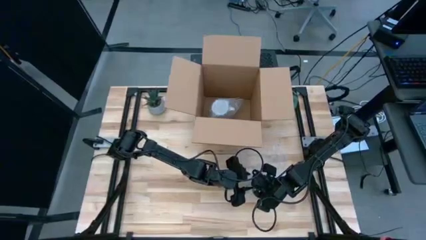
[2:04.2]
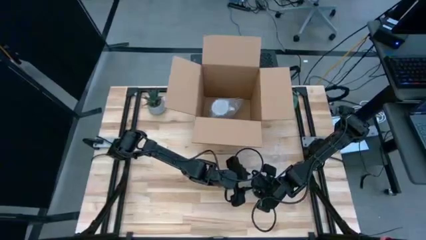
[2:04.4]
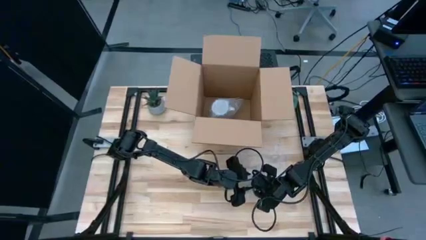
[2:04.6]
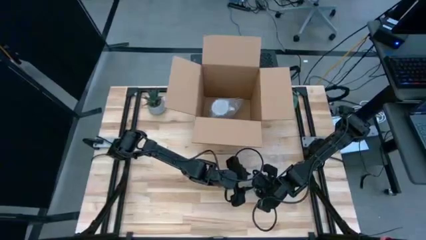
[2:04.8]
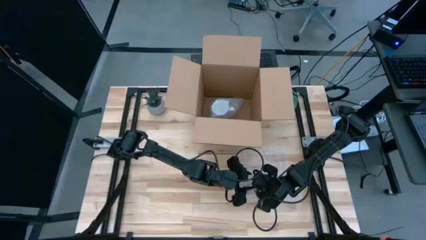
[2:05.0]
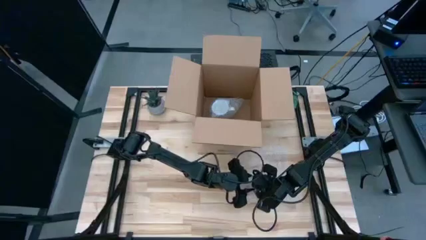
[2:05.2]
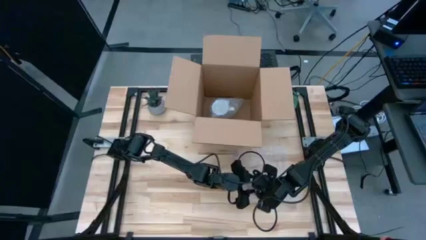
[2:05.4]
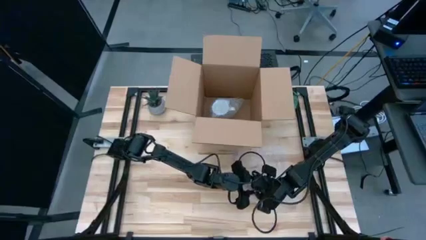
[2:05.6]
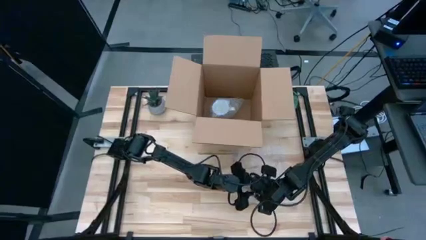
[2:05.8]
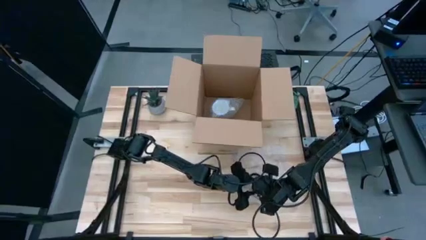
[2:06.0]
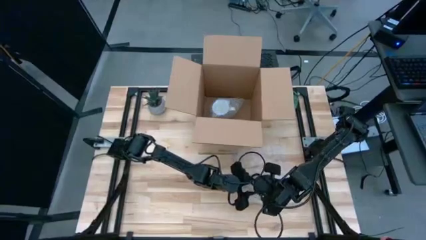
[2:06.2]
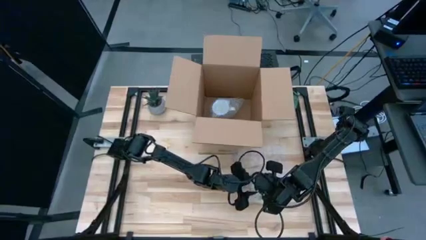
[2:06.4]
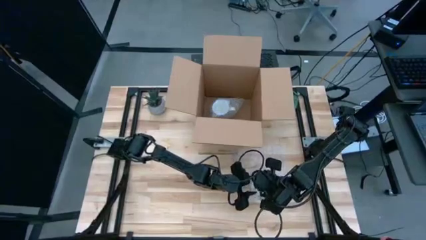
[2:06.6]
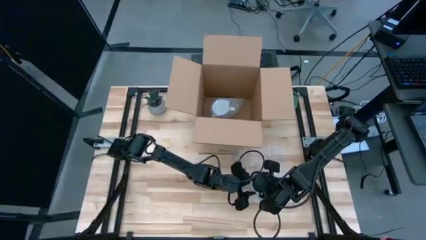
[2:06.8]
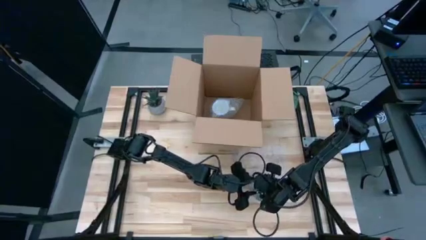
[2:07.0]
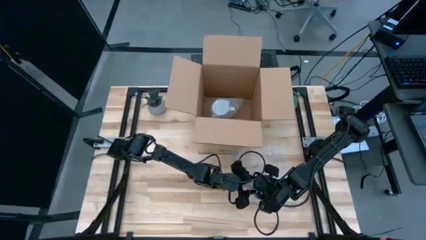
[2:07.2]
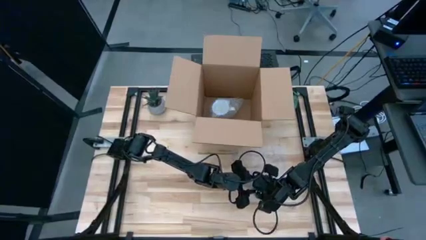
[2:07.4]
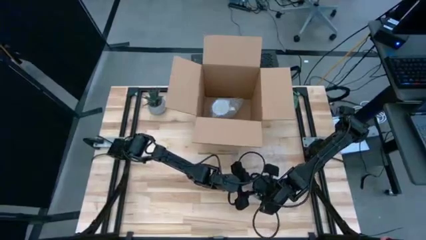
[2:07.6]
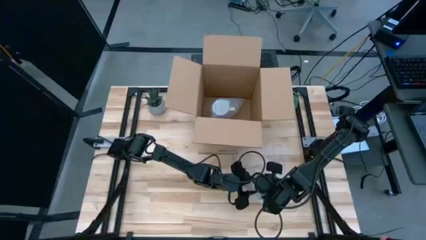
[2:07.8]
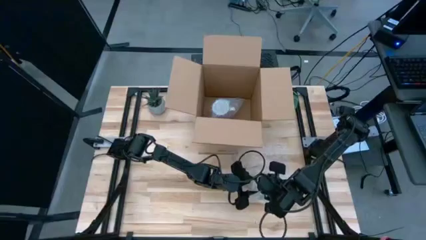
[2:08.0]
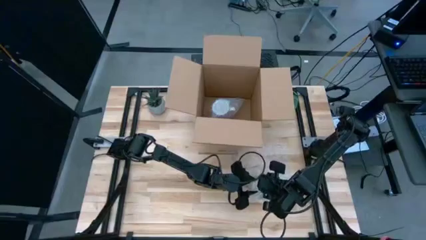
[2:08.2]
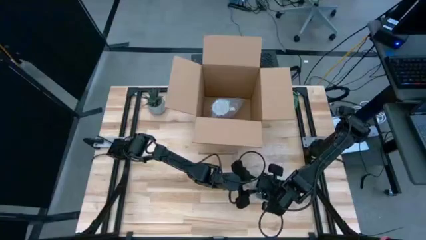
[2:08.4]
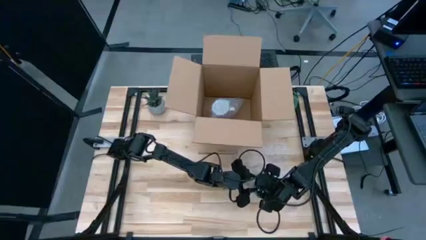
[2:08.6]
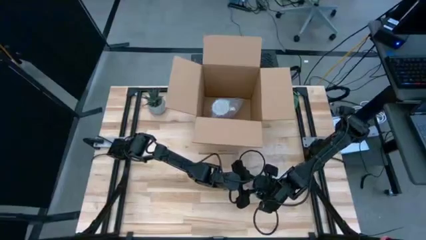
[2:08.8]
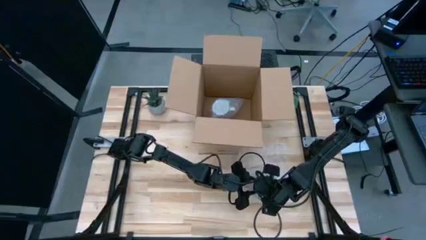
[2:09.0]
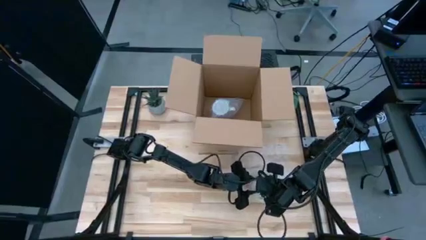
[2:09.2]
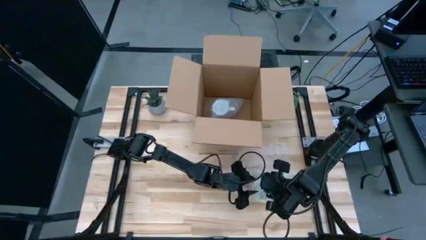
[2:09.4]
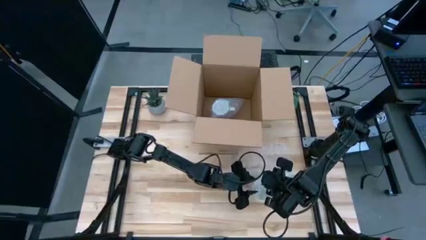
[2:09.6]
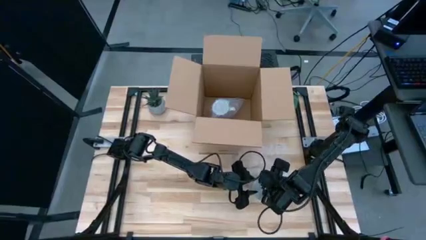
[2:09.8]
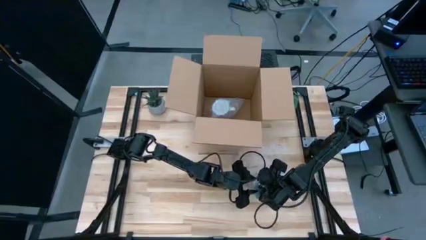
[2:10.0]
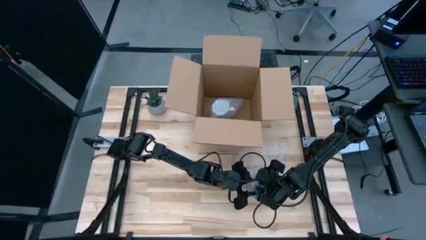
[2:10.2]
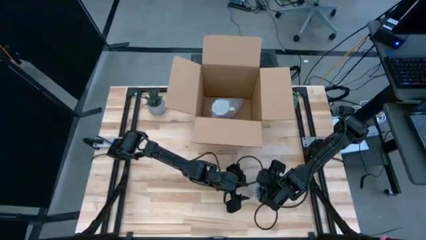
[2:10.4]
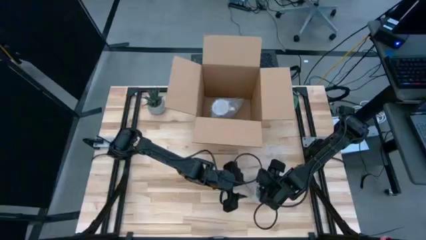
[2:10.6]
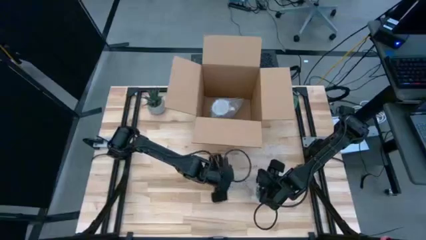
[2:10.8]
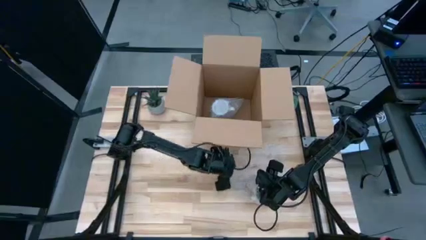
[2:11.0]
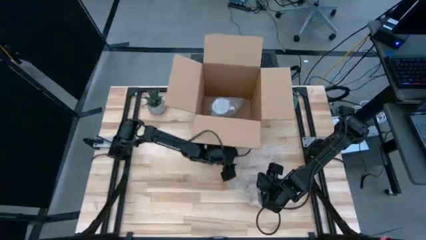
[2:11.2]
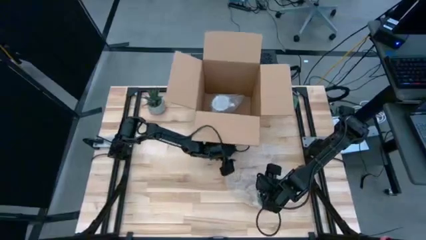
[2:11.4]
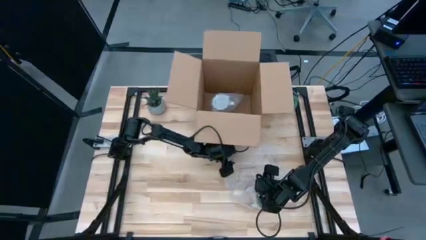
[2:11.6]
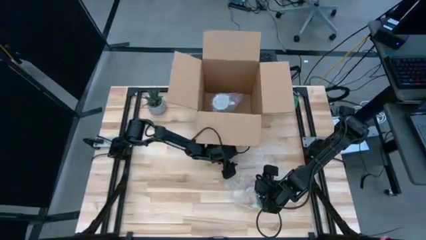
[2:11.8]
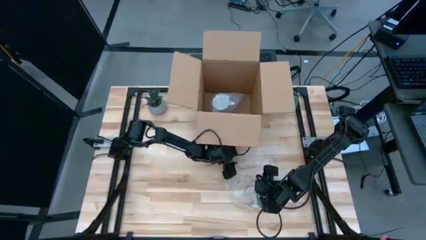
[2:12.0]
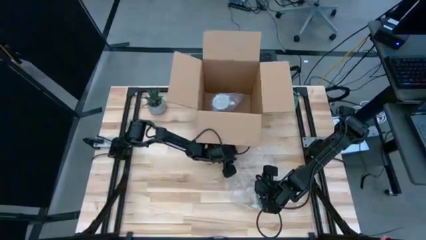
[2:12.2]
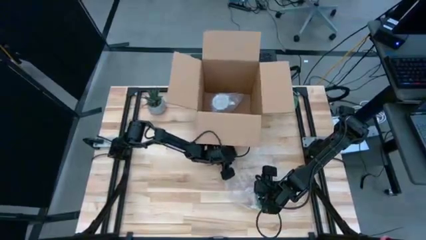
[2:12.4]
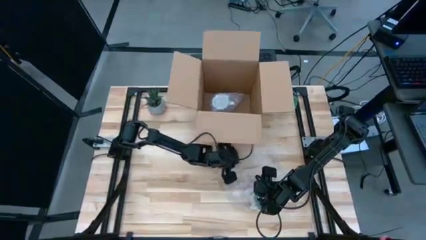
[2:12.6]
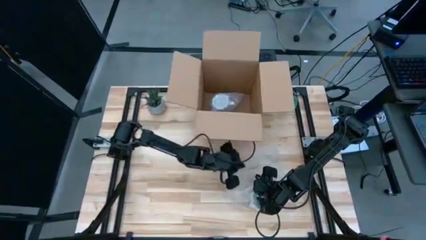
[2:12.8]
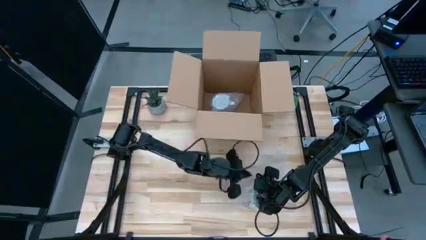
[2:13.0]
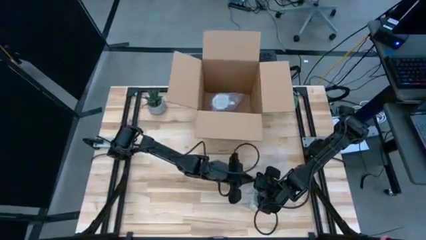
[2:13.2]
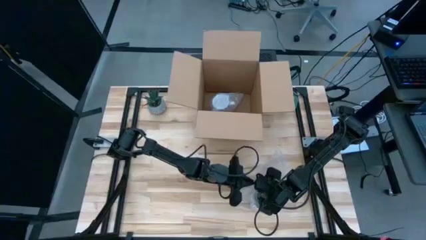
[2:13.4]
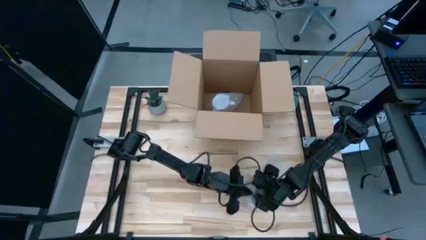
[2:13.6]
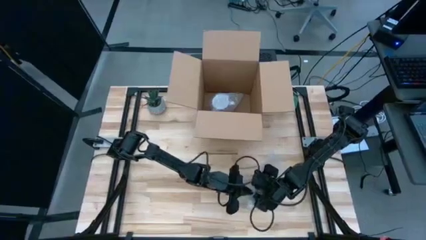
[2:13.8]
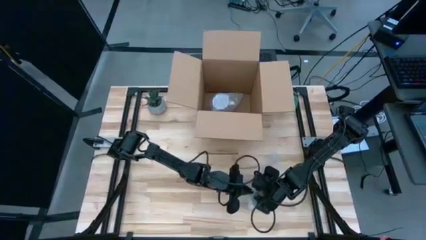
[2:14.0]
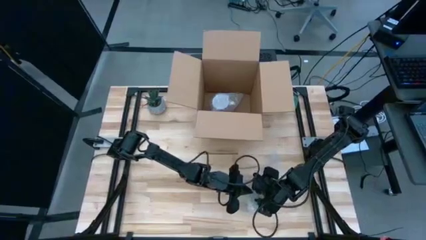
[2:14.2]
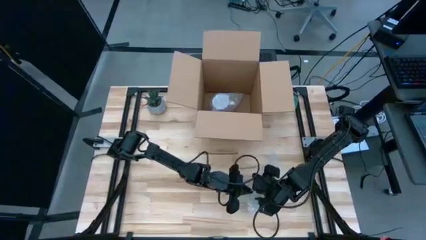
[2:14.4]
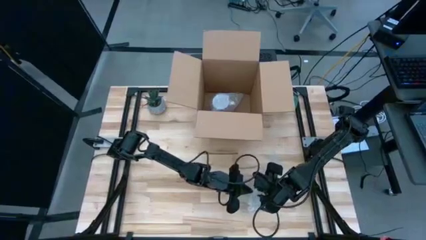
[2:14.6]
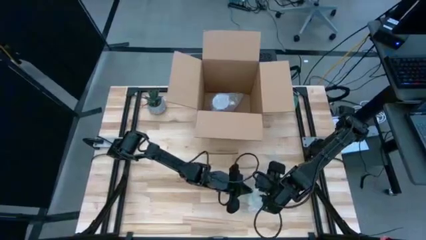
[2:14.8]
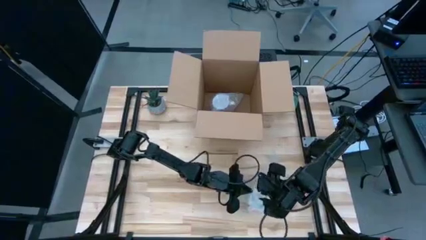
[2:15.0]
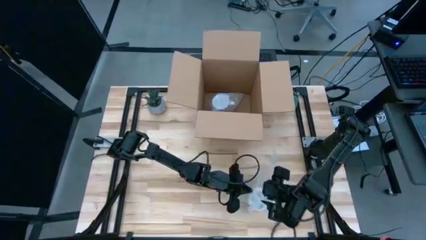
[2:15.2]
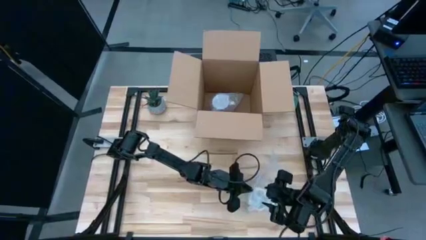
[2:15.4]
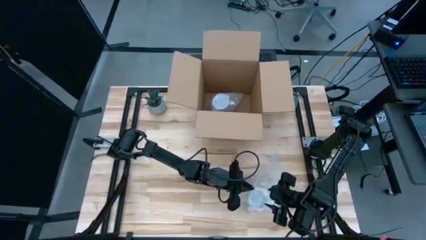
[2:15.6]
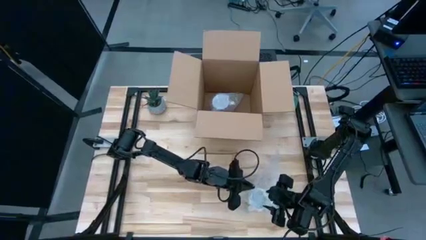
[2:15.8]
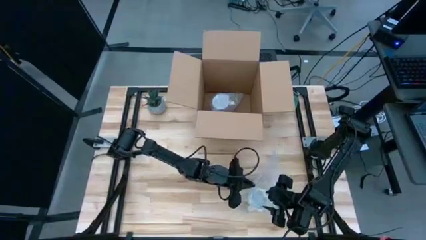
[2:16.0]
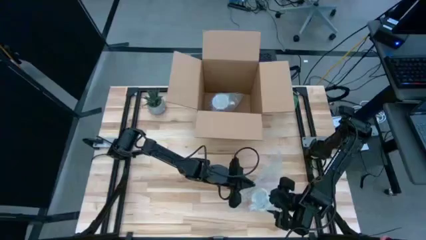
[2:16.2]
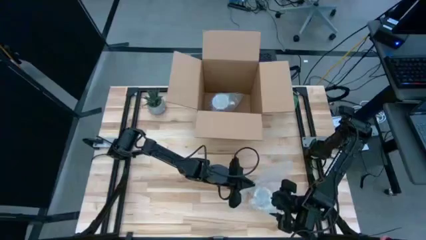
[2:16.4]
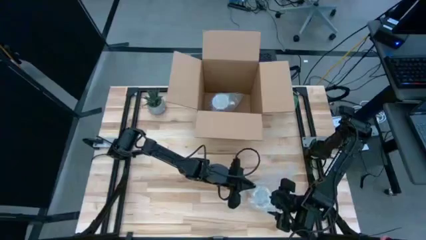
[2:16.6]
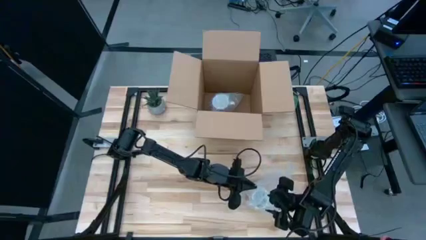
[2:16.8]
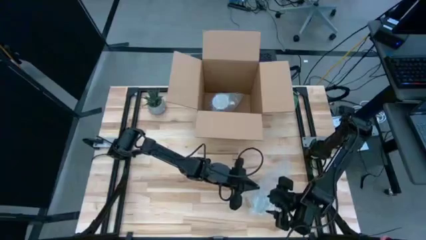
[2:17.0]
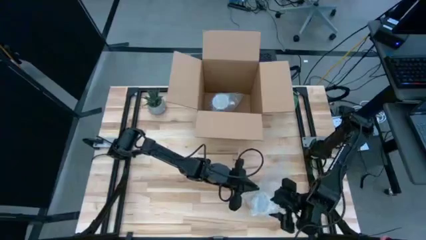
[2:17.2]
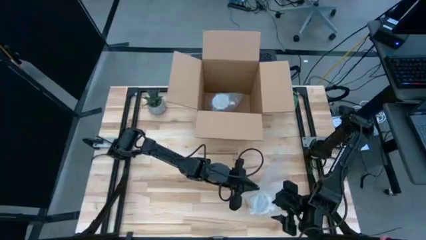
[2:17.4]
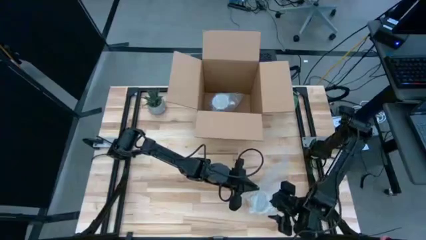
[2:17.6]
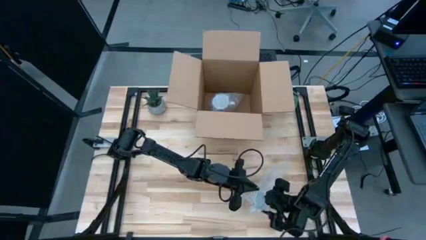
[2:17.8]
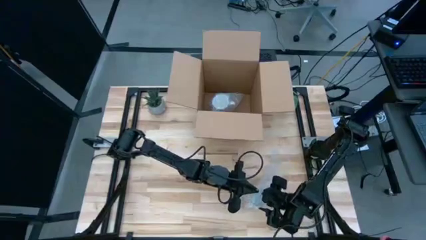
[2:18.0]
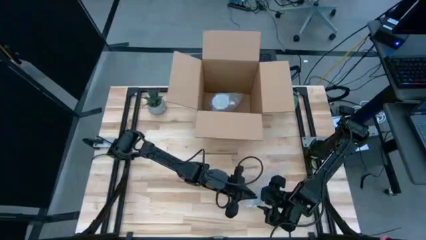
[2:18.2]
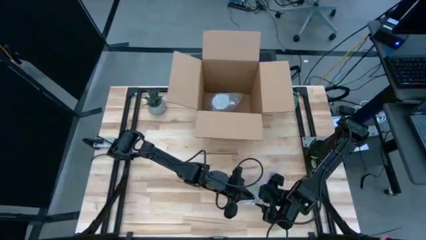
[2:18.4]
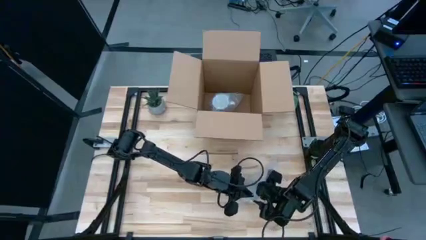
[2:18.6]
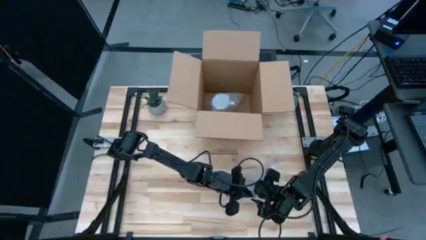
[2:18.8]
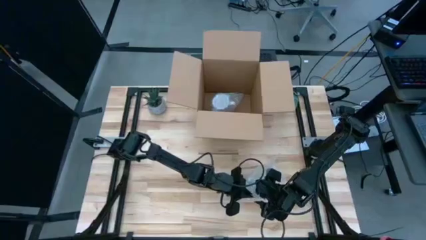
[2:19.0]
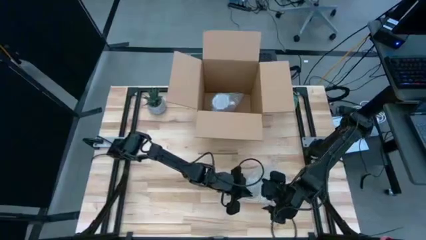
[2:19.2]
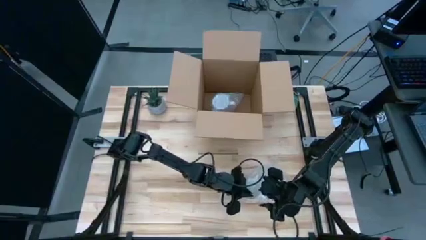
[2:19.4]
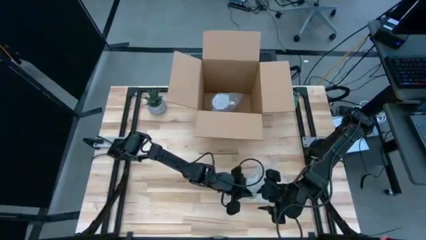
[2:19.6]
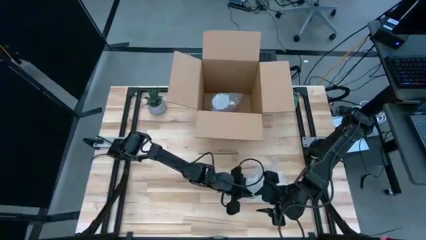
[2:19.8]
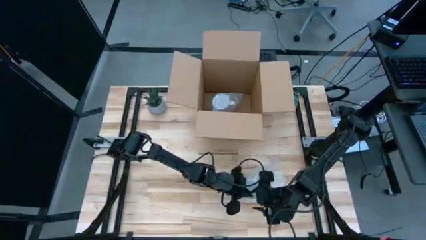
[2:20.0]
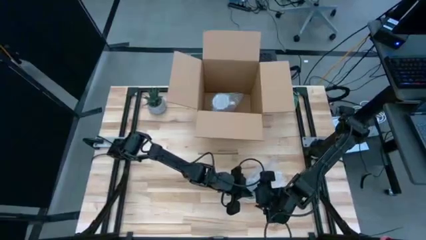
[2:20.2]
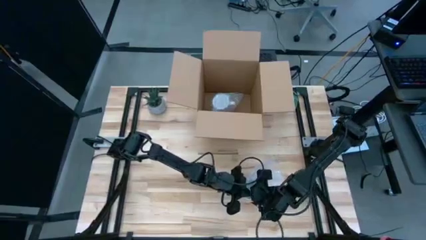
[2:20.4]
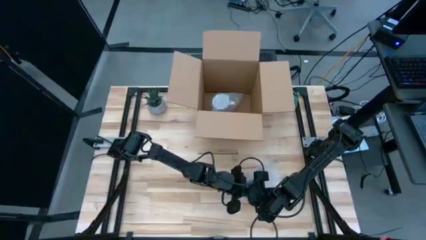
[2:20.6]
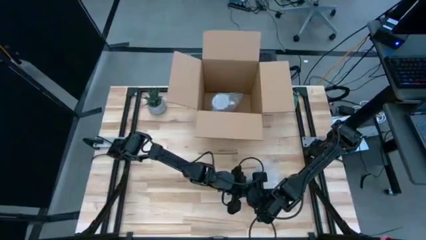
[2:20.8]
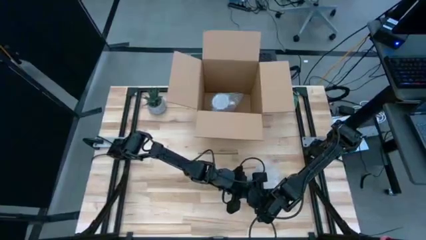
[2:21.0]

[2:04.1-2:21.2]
Task: wrap mug
Wrap the orange mug with the bubble wrap
